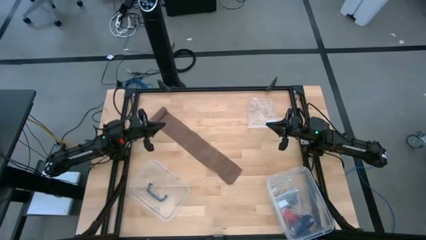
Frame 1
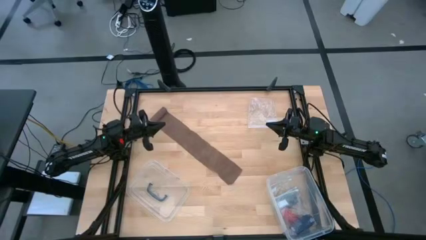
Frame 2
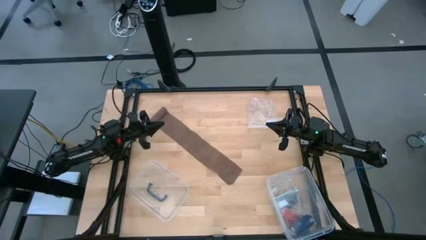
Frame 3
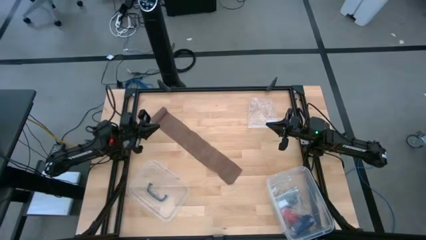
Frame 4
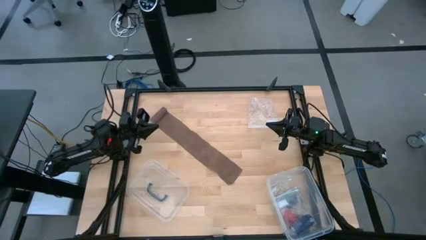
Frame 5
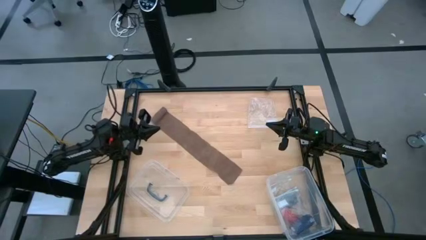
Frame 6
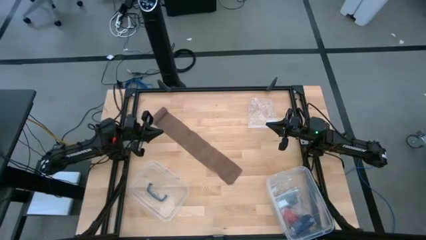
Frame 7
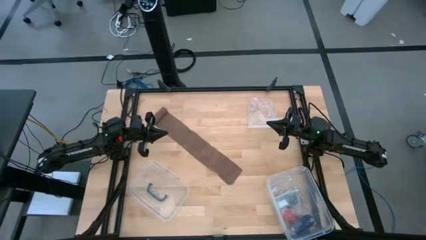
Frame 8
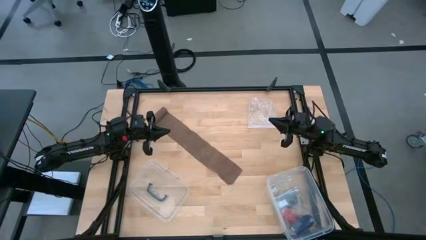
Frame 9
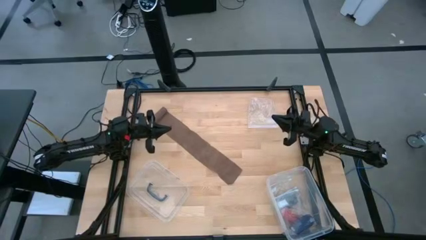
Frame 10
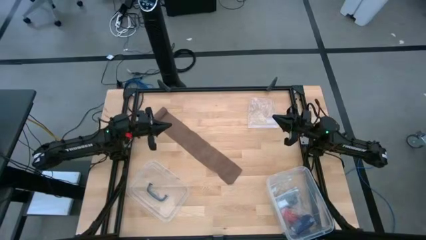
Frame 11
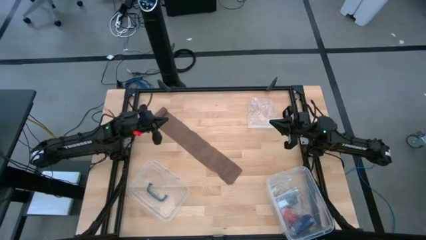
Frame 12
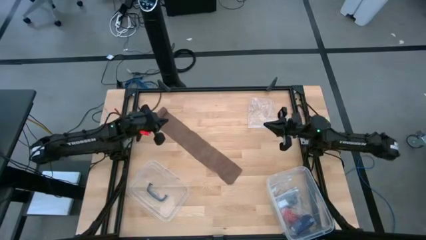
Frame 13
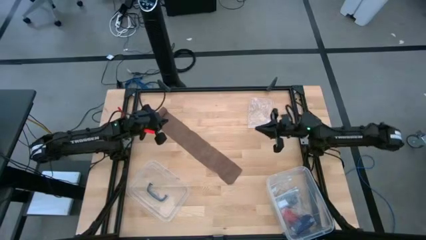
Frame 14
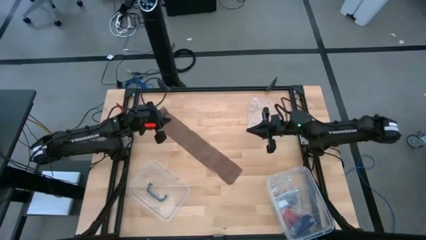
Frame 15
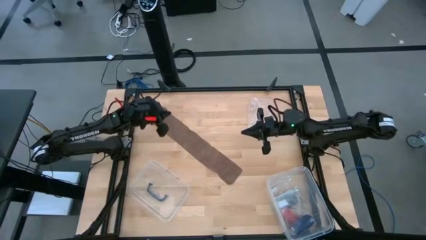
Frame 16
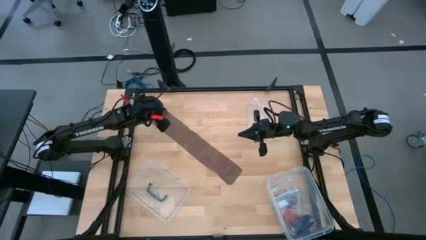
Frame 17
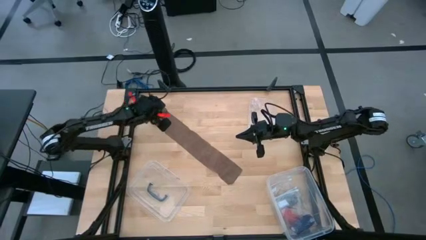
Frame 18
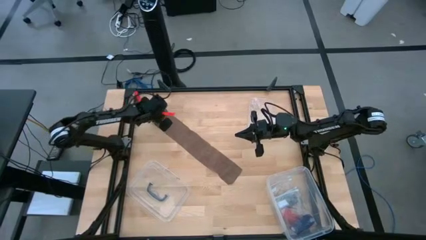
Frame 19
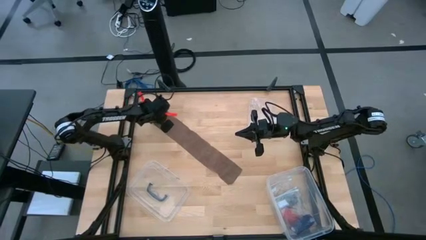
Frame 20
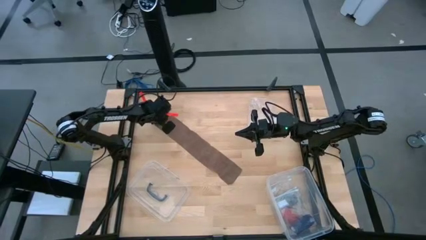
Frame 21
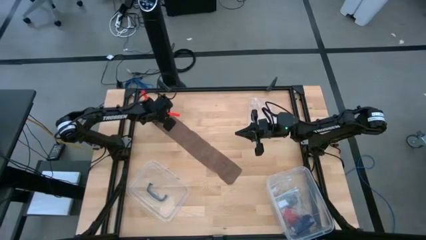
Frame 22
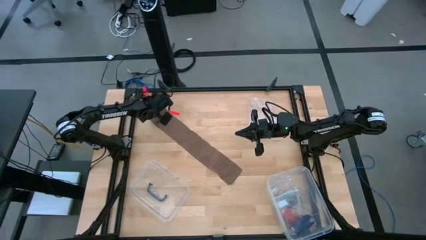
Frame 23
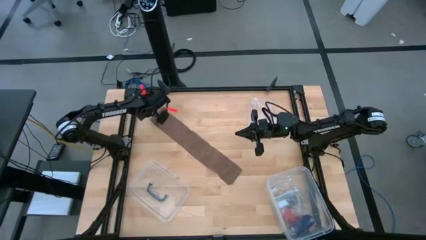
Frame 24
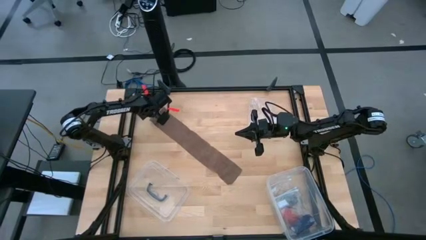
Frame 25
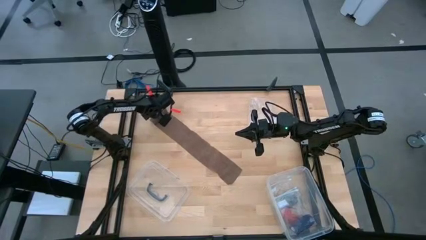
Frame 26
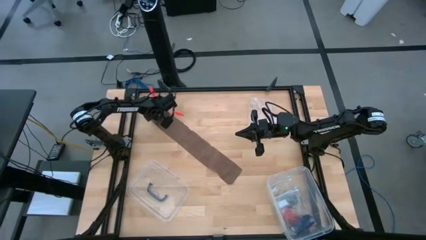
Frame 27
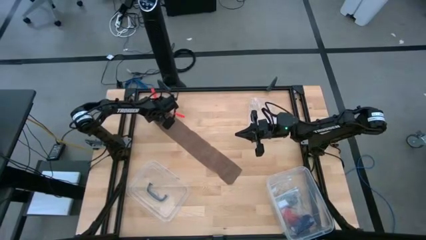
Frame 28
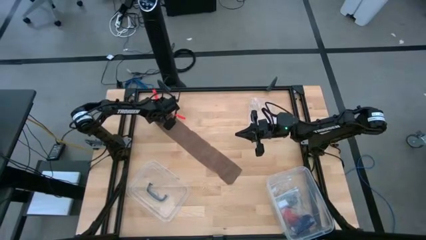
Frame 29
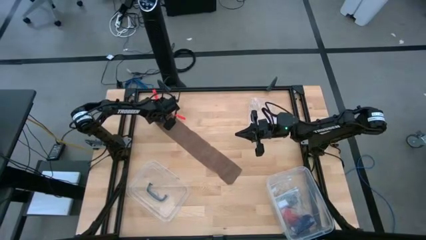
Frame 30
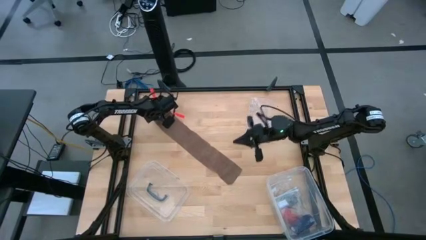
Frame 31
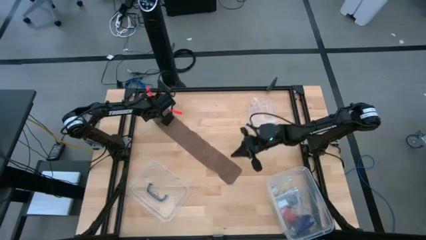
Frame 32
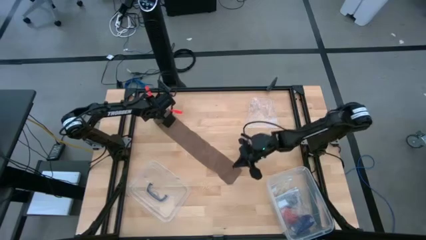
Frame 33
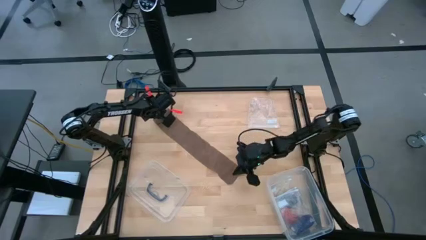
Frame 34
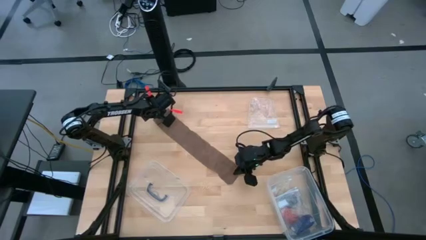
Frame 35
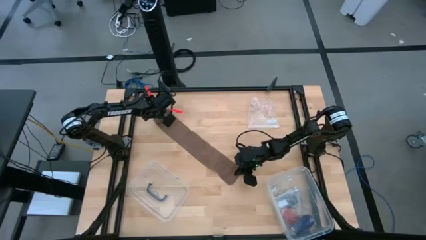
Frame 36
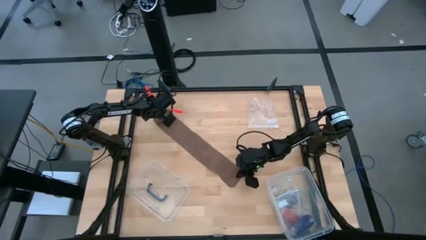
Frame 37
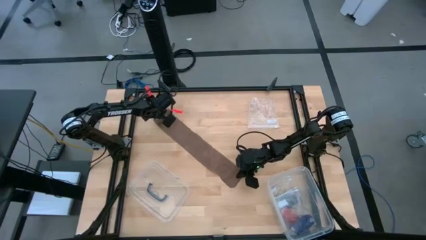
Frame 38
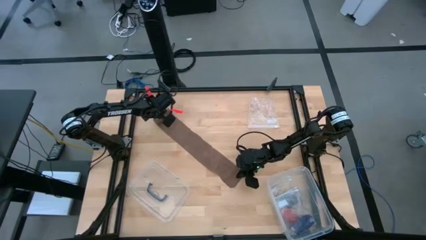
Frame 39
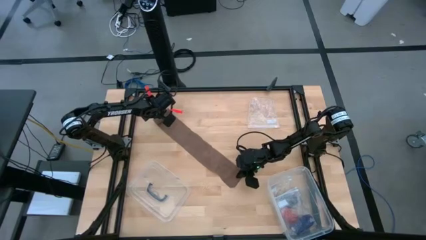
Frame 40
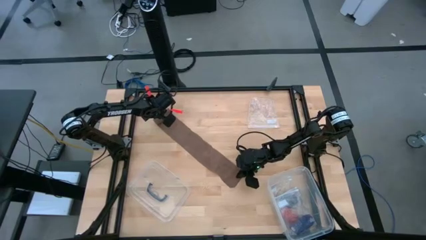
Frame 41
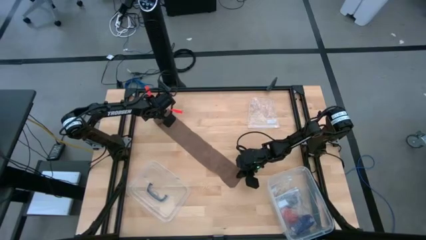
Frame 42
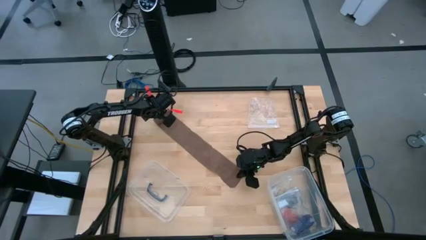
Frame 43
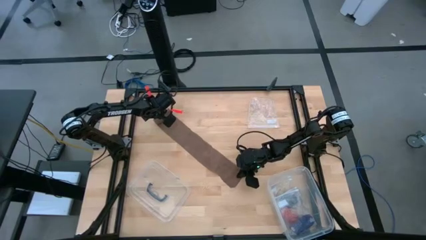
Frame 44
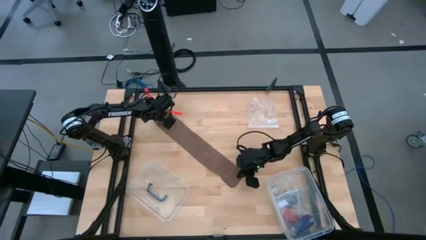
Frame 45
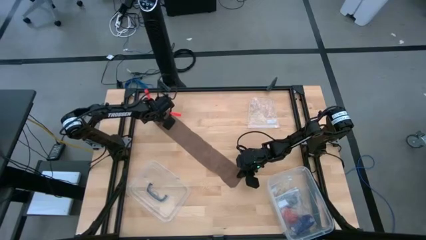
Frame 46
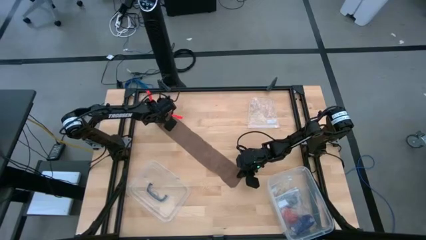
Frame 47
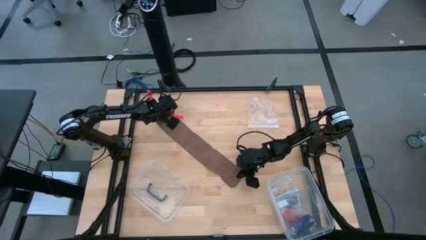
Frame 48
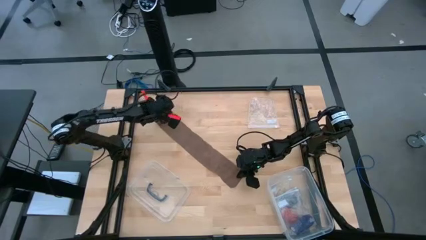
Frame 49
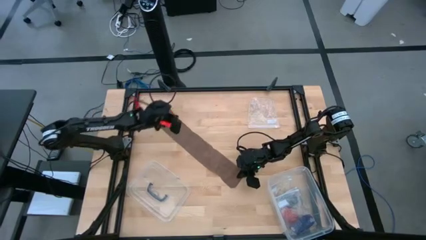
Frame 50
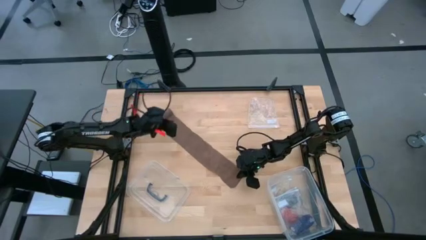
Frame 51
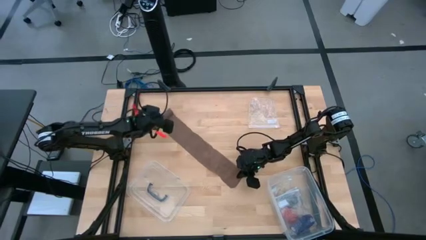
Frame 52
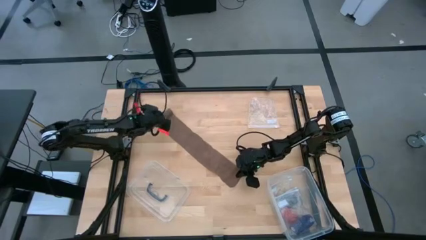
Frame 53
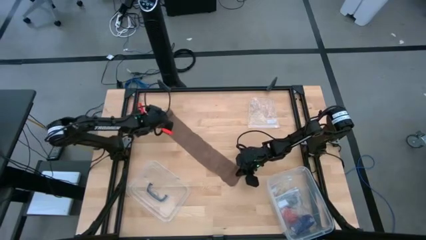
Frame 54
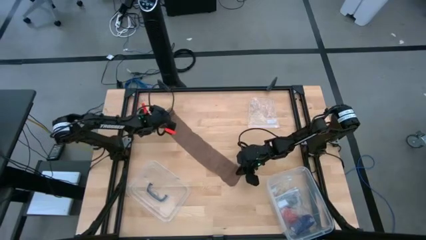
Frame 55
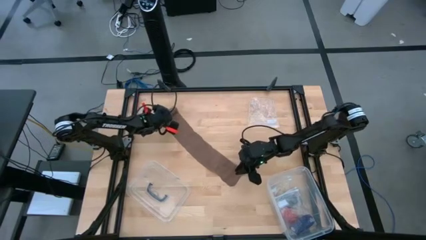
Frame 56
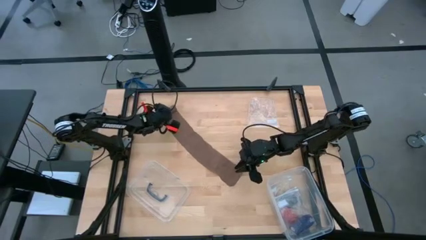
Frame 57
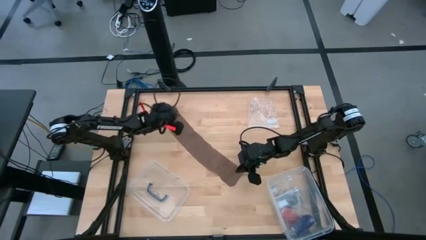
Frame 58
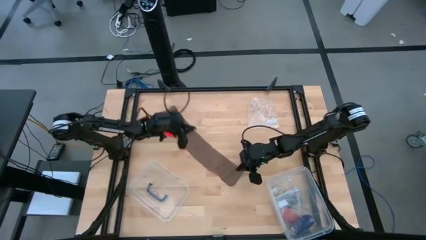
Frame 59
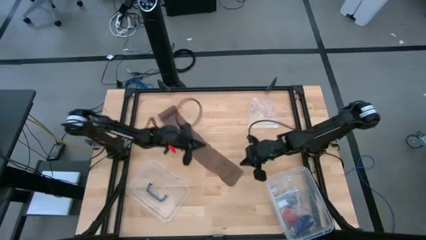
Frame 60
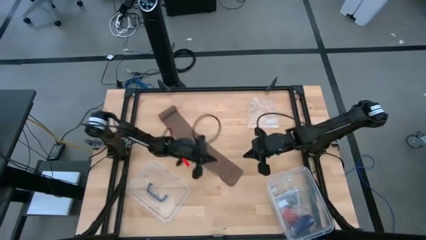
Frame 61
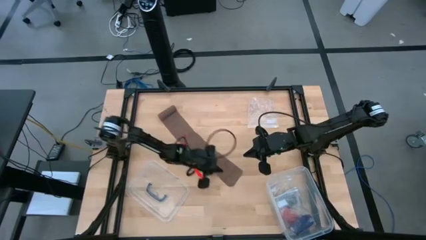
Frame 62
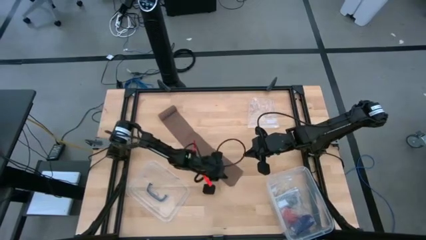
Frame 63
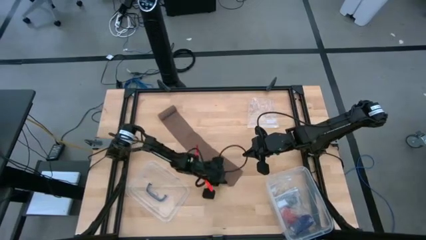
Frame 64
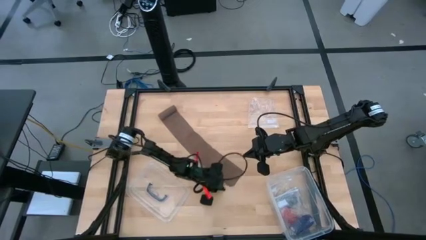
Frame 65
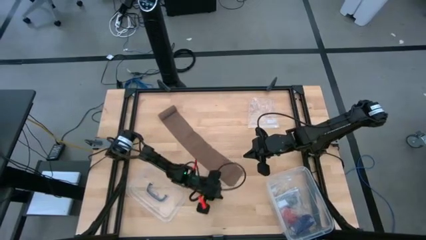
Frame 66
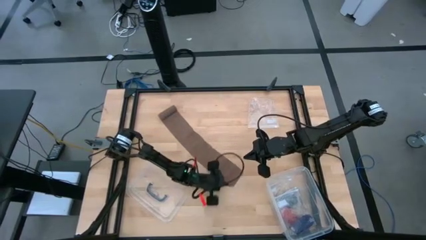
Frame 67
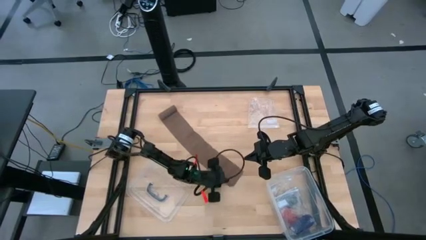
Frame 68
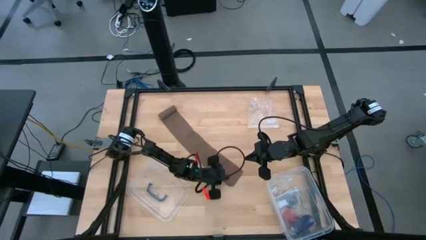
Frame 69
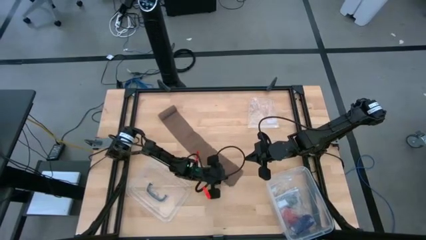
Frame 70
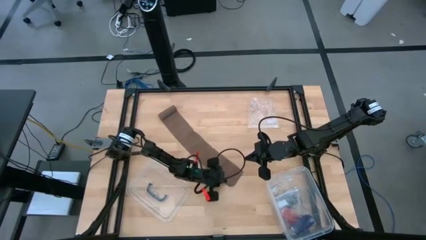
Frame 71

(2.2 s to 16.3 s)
Task: Roll bandage
Roll the brown bandage

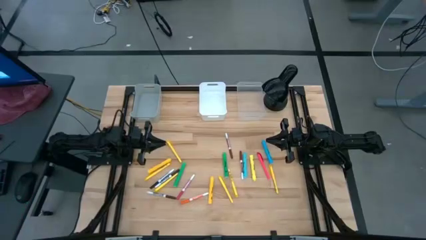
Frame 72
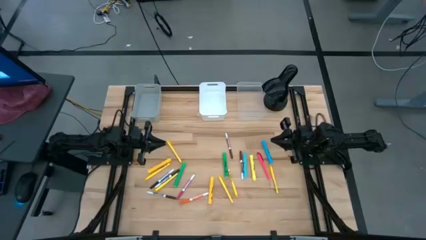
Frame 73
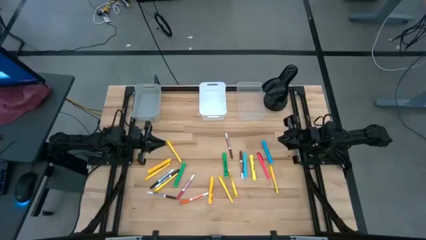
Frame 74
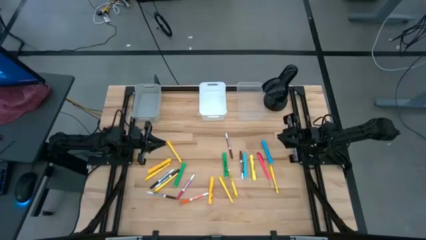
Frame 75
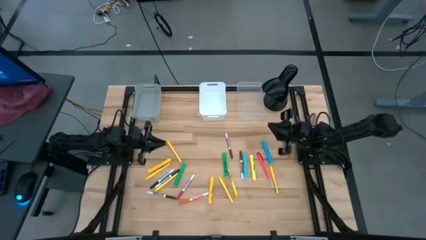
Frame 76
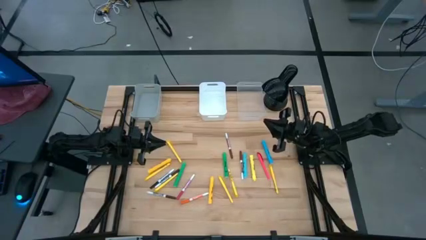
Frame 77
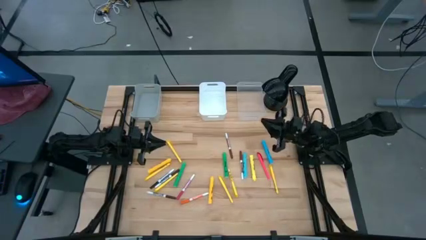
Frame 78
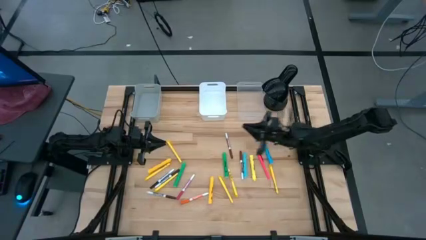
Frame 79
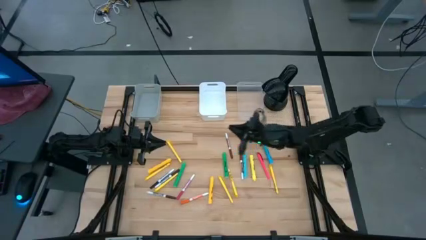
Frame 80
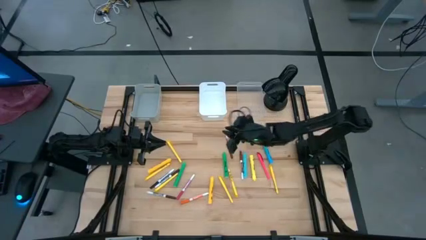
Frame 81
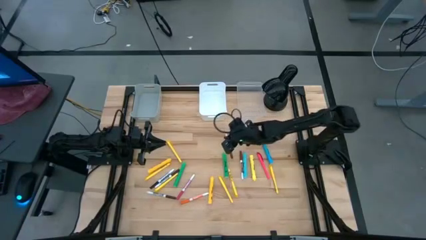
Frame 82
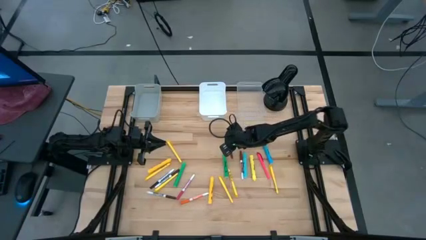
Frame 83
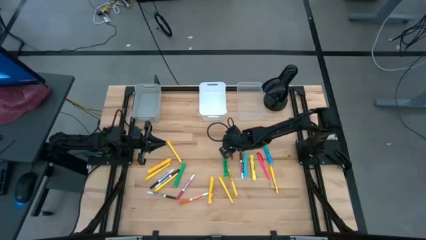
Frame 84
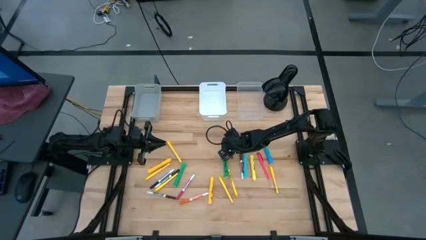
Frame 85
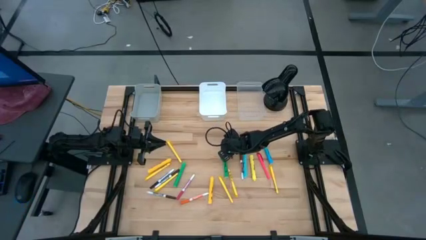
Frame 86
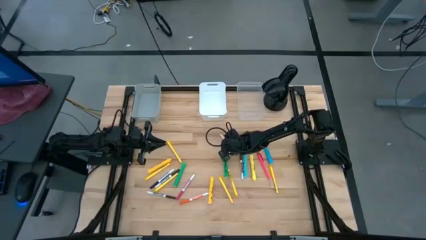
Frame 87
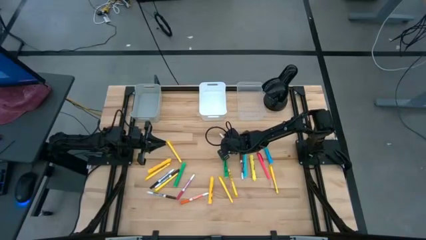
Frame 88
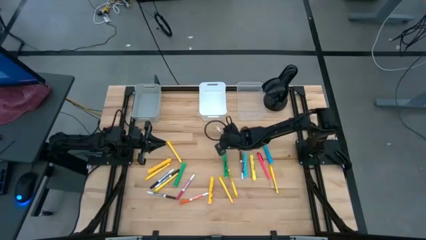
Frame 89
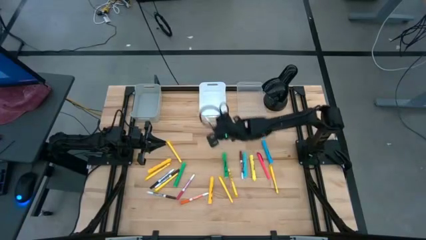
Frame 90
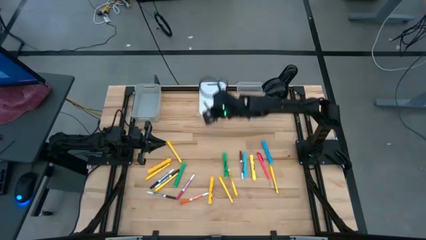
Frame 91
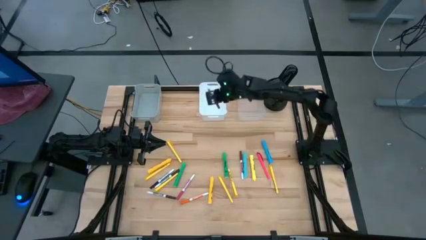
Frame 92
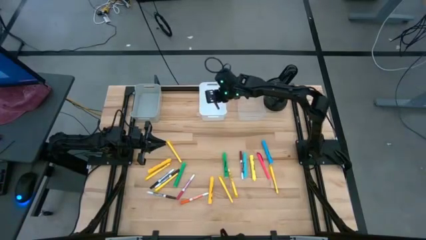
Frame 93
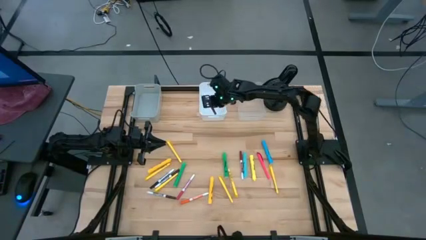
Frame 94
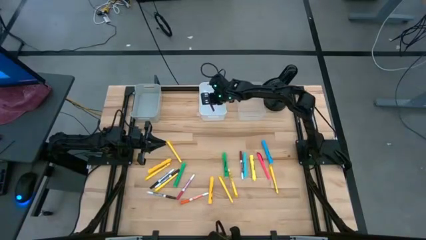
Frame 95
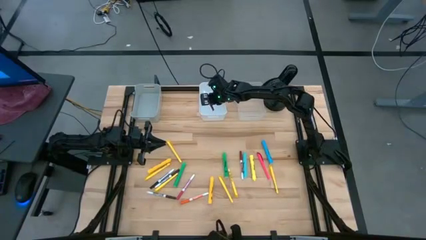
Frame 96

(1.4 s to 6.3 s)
Task: Pick & Place Markers
Put the brown erase marker into the white bin
